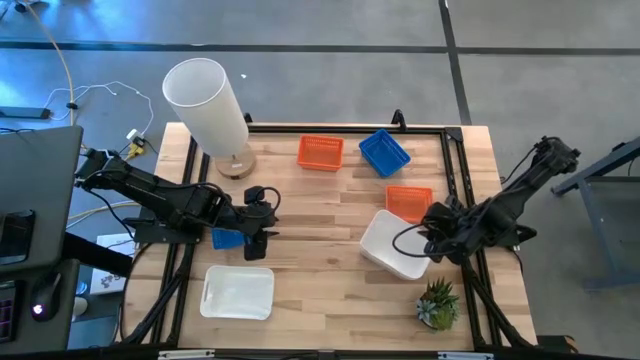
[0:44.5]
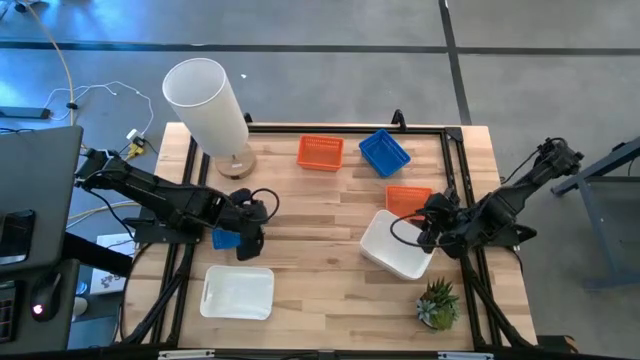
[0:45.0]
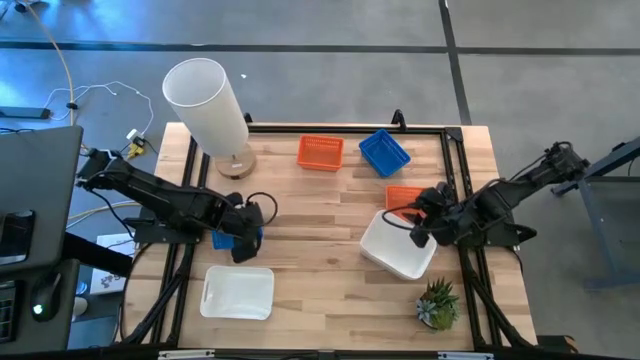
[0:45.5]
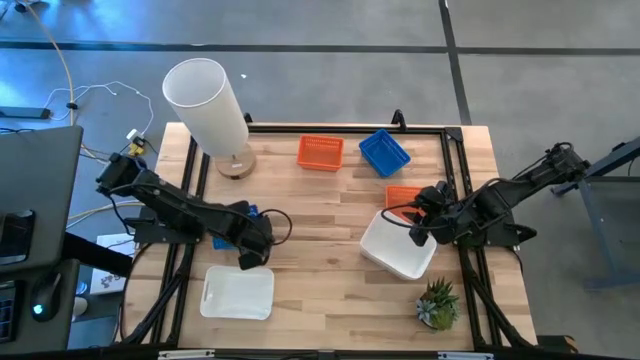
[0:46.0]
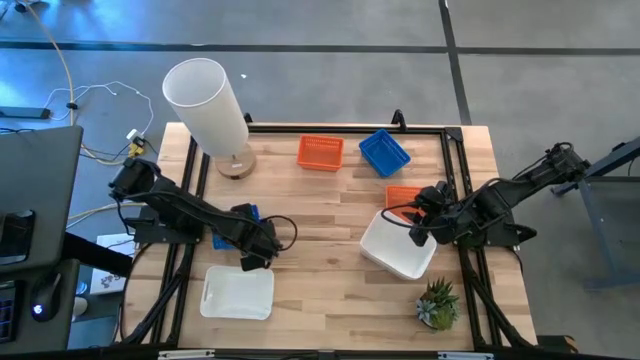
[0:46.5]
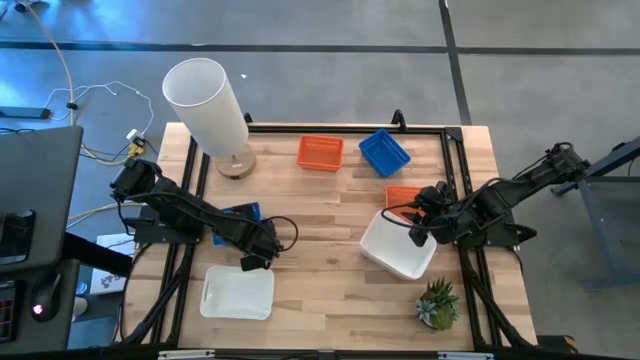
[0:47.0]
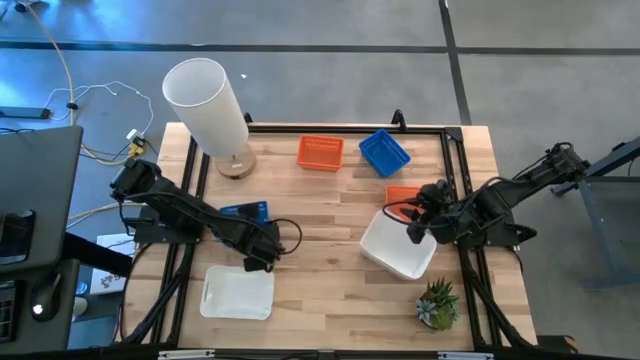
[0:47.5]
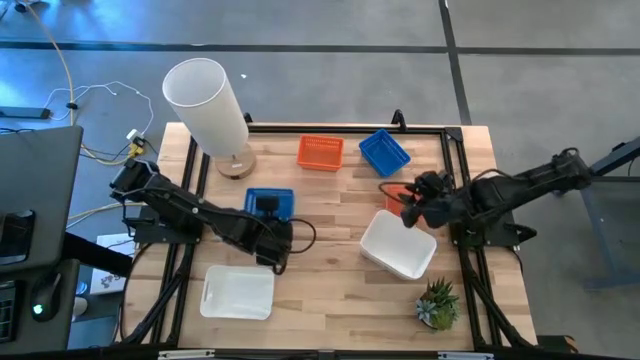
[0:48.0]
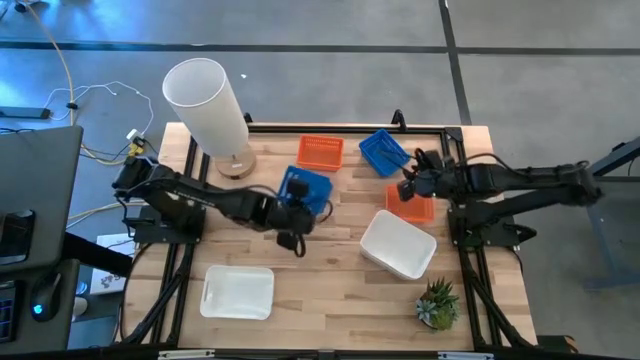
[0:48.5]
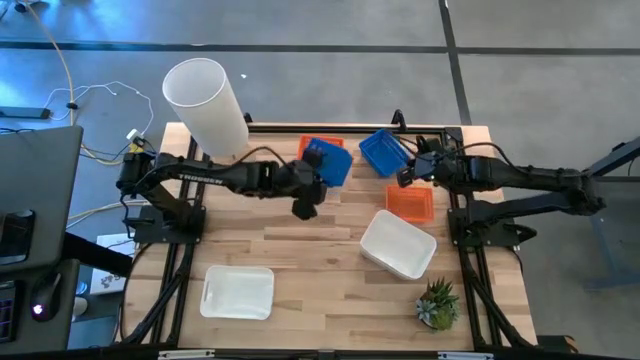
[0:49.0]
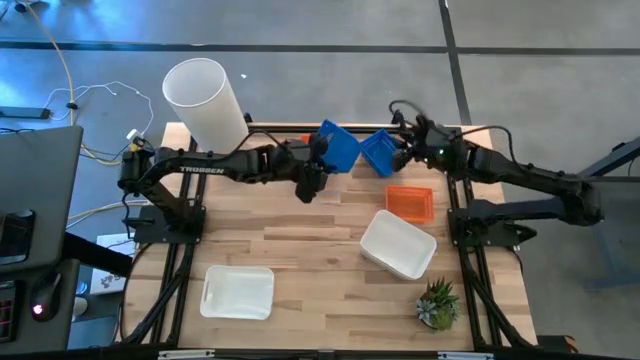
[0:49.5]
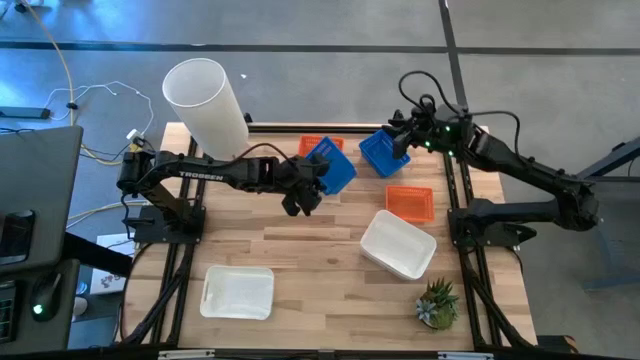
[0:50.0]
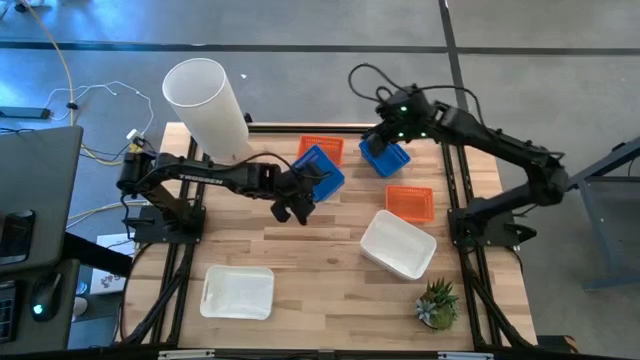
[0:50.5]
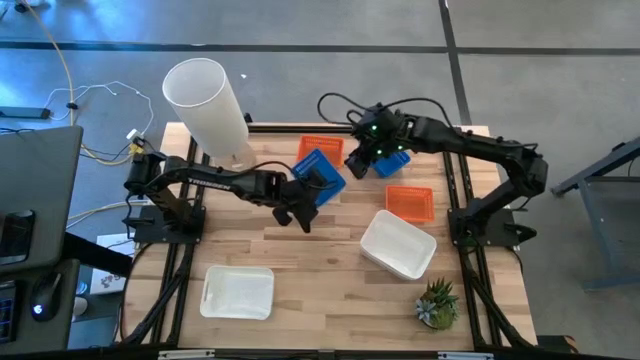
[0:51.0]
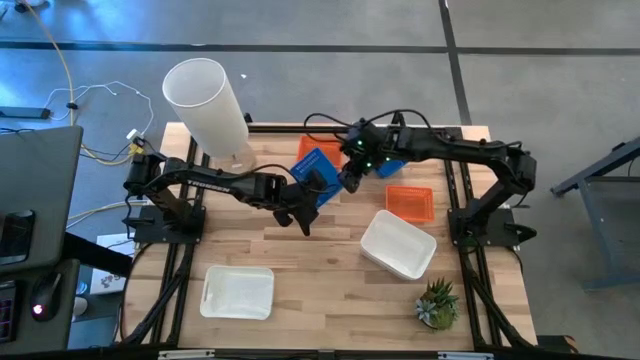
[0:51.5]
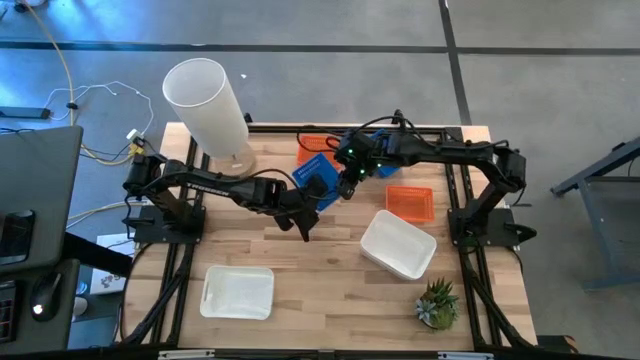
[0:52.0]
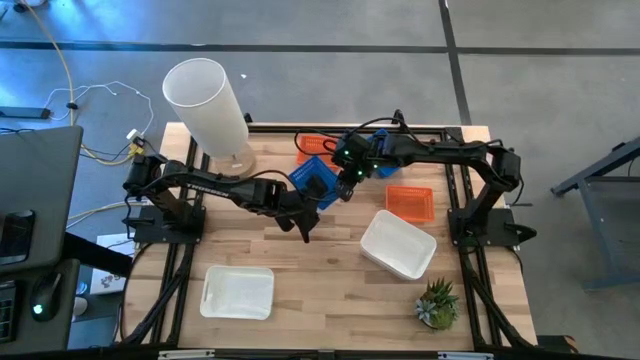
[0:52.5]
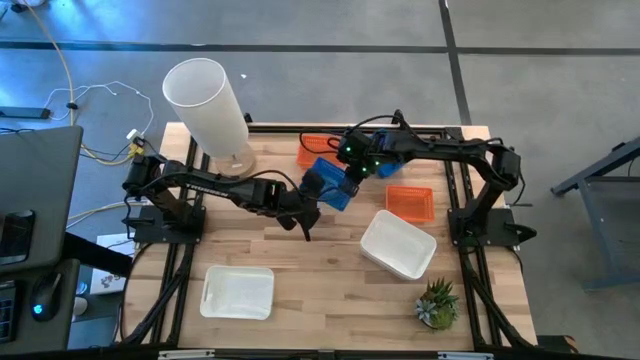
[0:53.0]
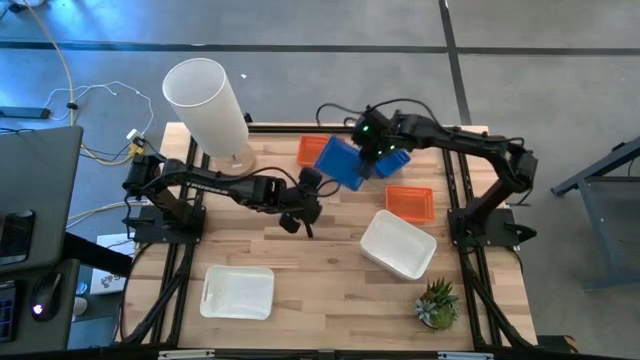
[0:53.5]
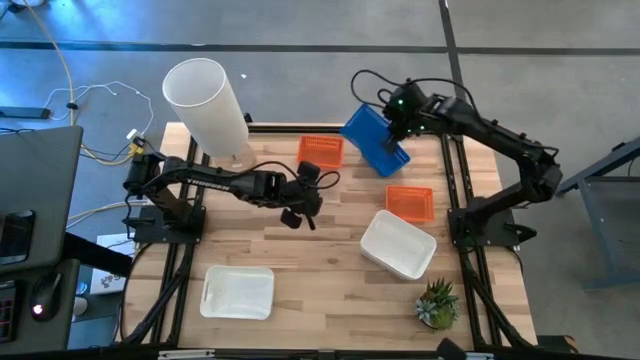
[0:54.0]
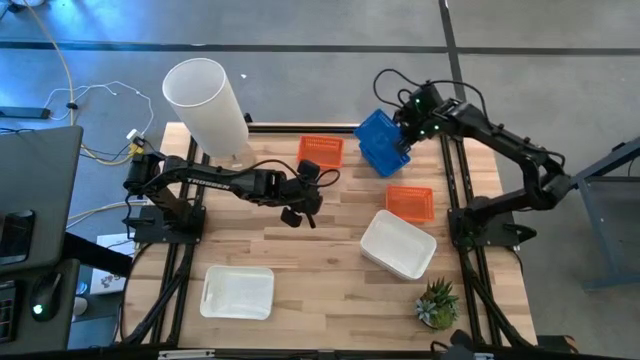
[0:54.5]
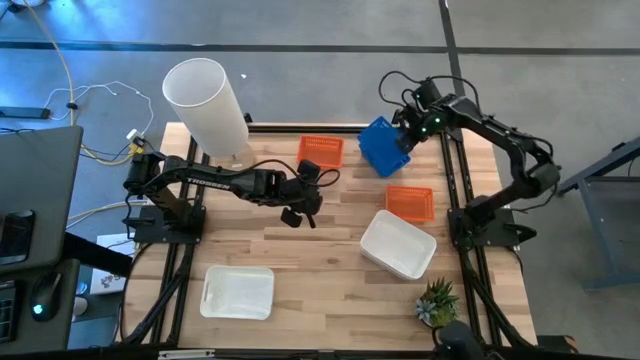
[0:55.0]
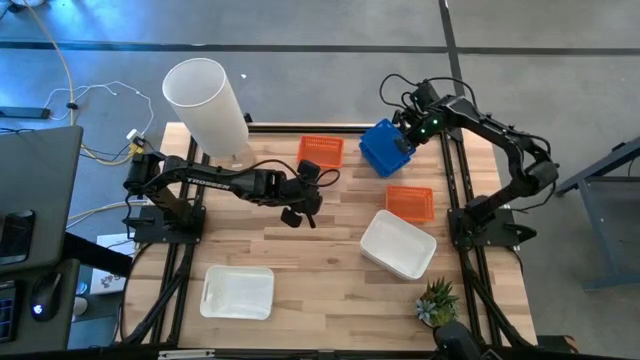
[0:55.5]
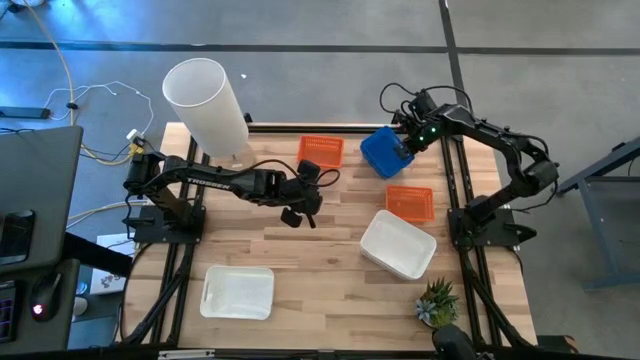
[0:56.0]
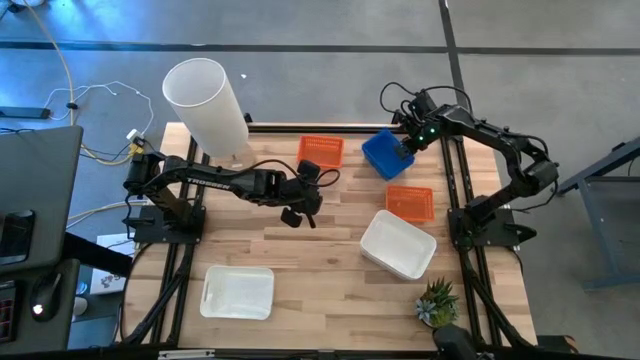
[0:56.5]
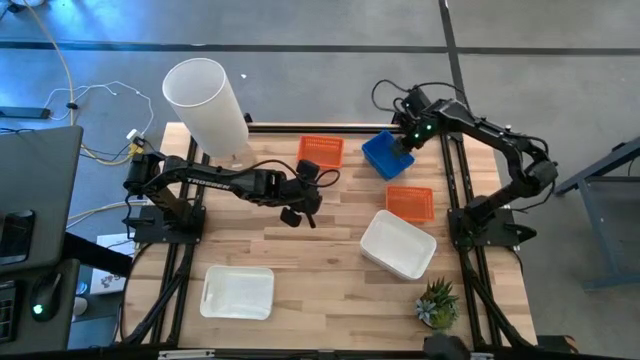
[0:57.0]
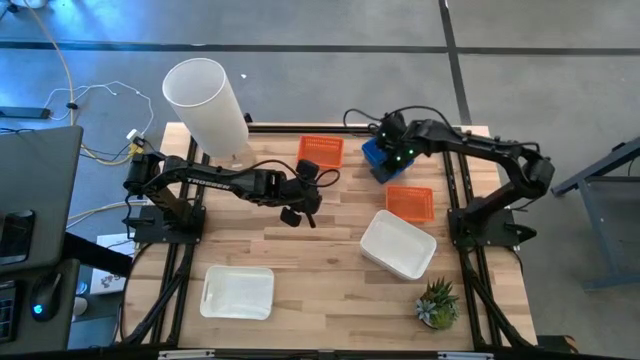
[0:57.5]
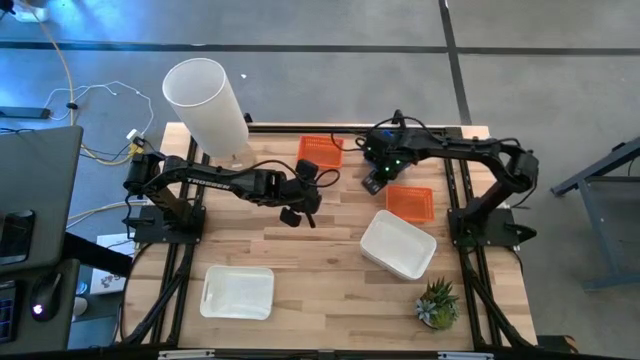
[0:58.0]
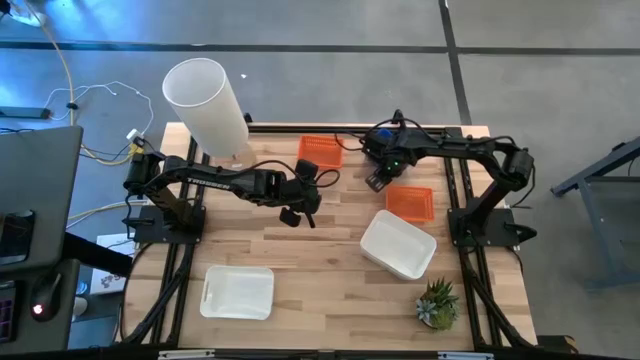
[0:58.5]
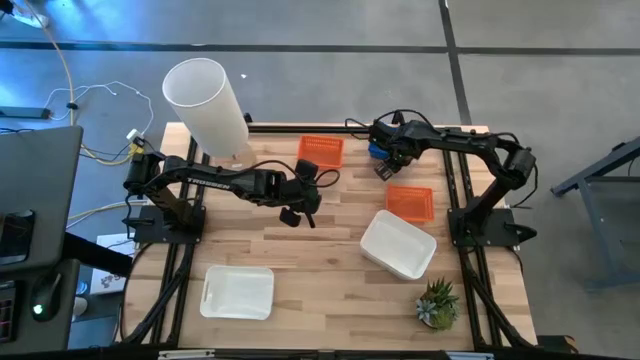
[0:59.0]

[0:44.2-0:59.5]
Stack the left blue bin on top of the other blue bin

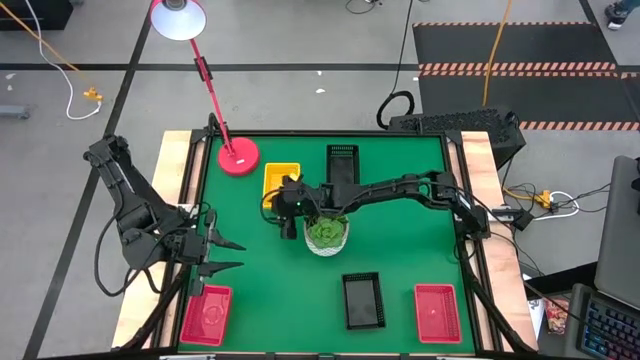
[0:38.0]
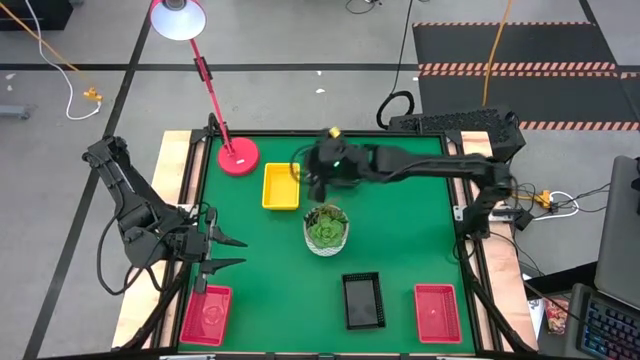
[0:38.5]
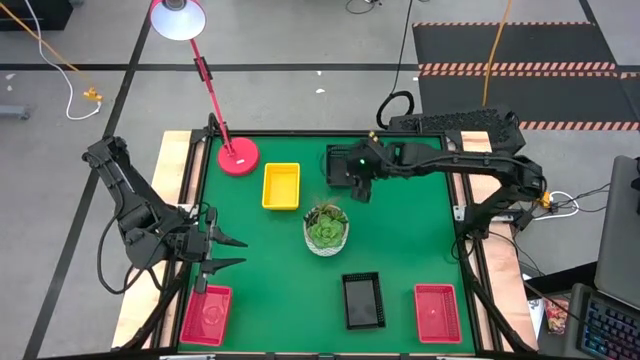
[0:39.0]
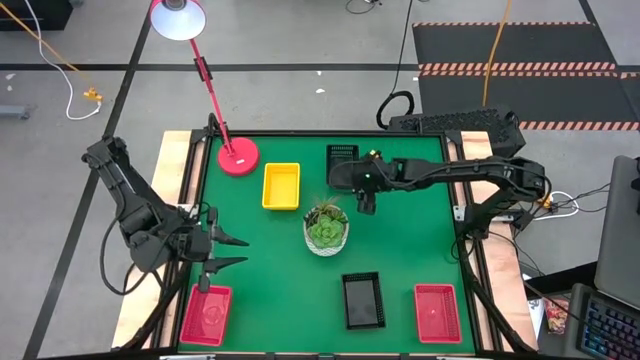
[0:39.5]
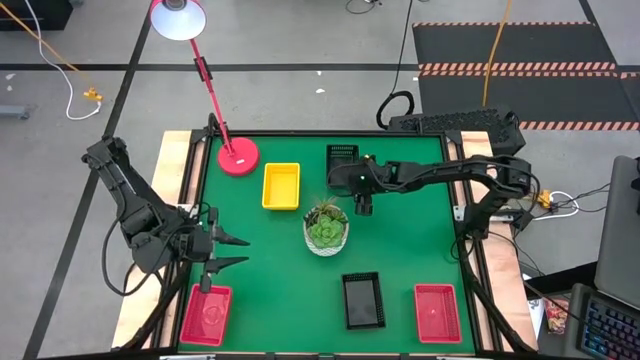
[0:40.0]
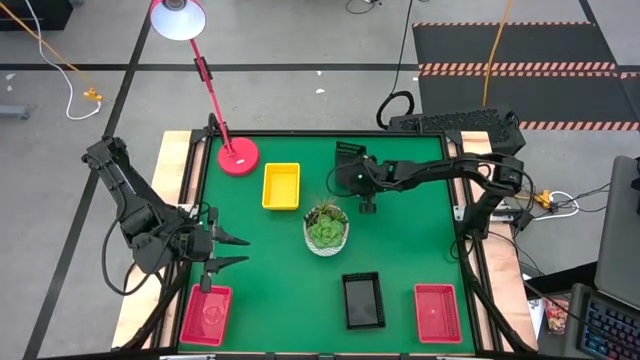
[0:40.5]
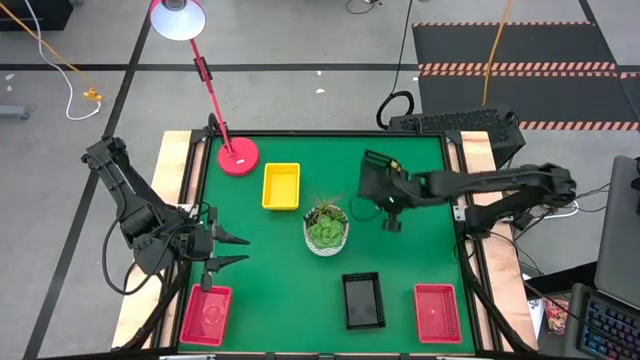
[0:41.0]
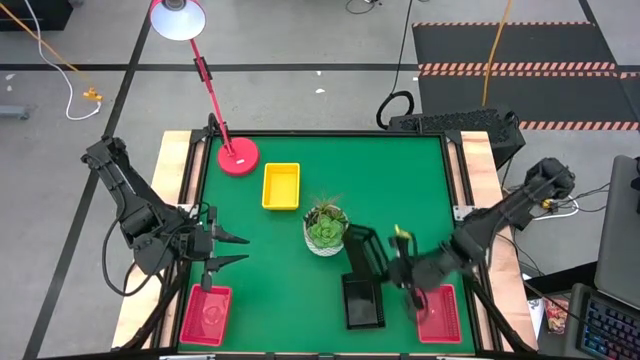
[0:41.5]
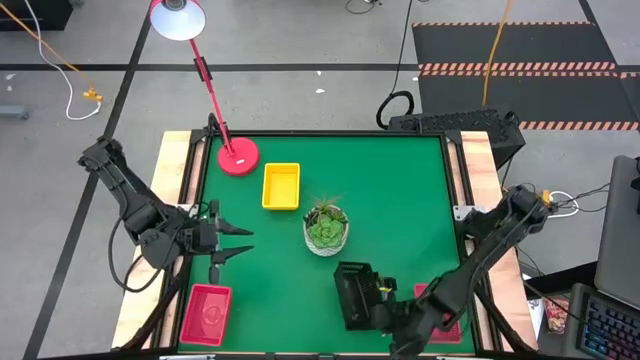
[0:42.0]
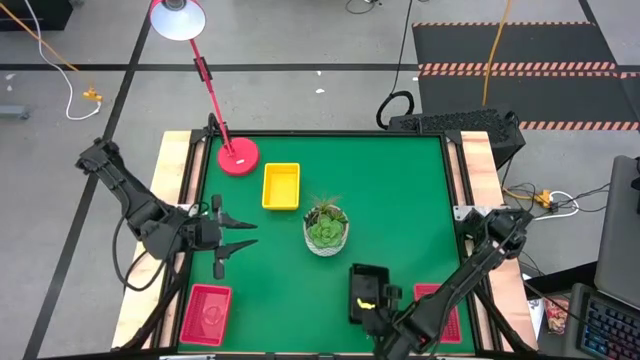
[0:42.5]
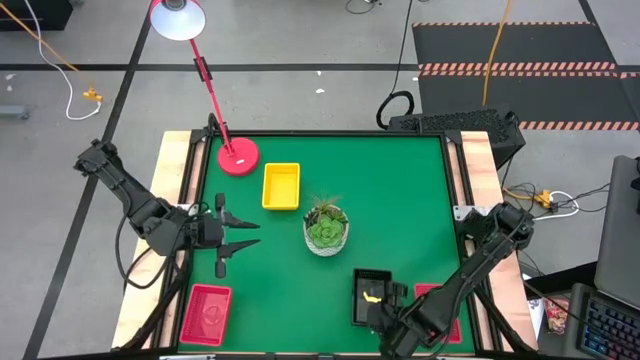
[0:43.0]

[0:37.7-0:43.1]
Stack the top black bin on top of the bottom black bin

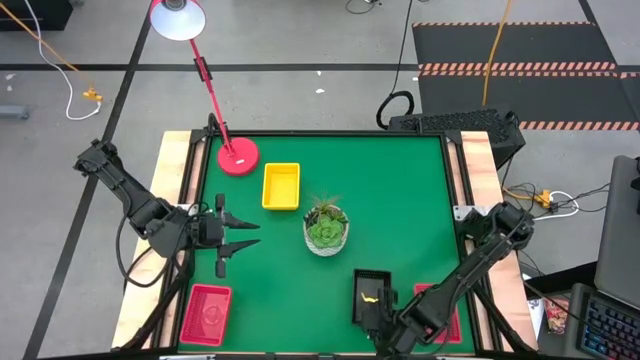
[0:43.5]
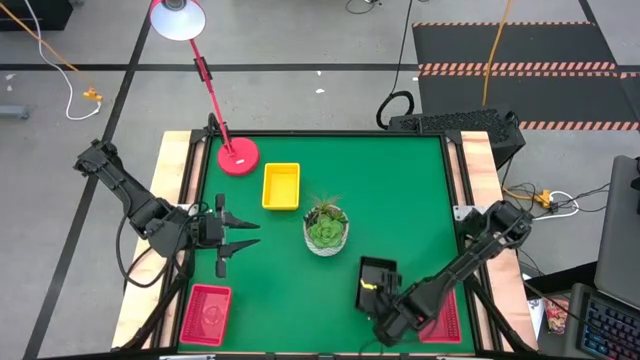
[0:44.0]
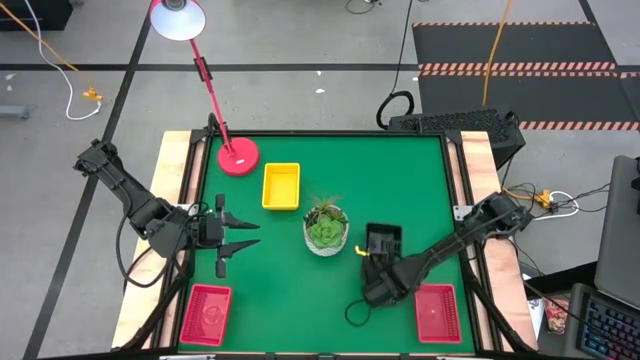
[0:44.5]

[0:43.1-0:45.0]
Move the stacked black bins to the middle of the table
